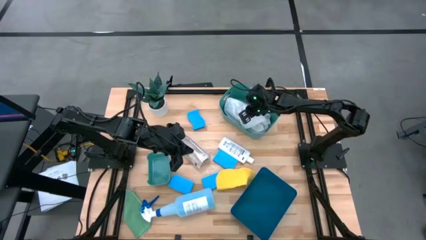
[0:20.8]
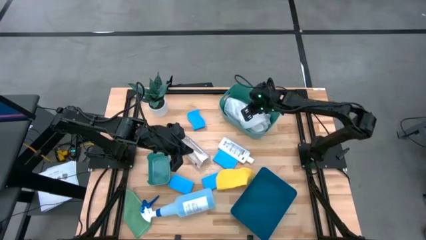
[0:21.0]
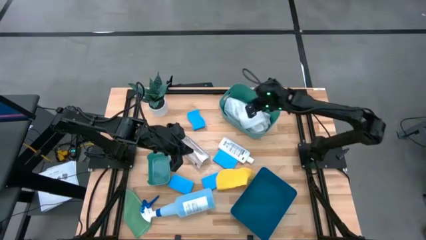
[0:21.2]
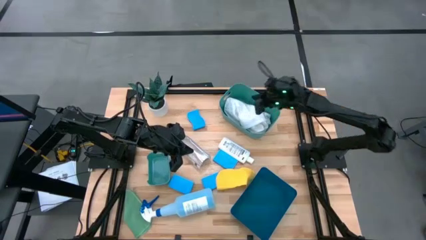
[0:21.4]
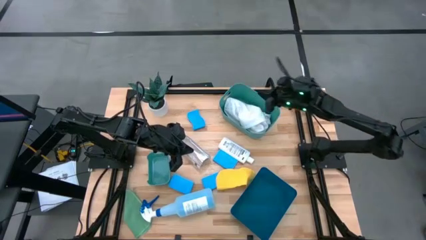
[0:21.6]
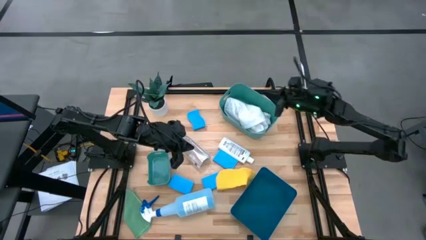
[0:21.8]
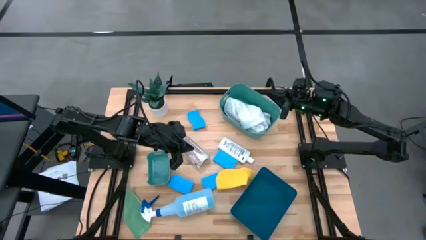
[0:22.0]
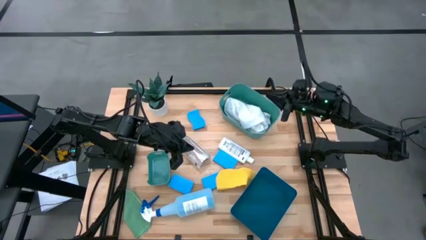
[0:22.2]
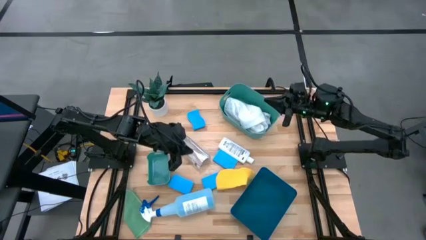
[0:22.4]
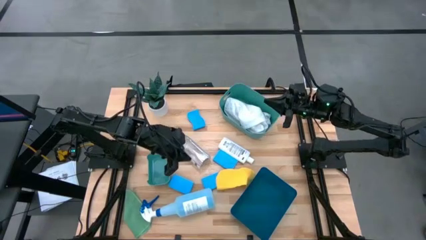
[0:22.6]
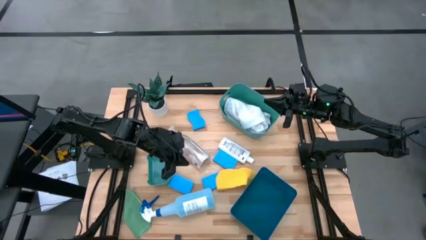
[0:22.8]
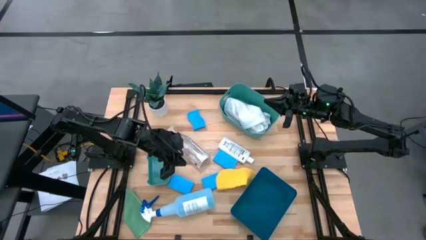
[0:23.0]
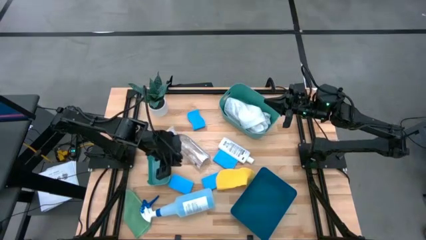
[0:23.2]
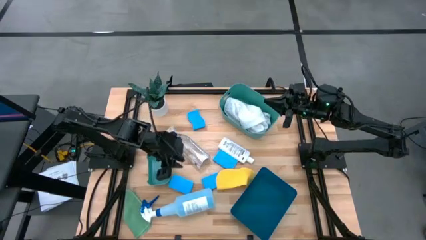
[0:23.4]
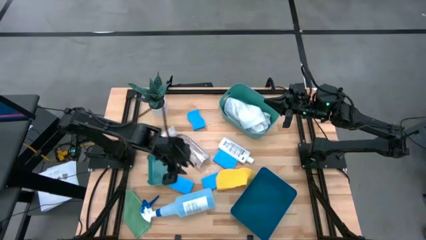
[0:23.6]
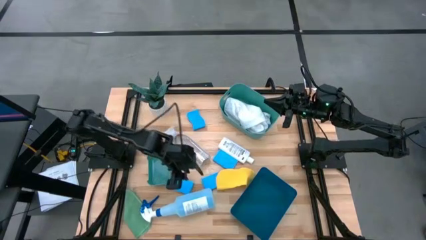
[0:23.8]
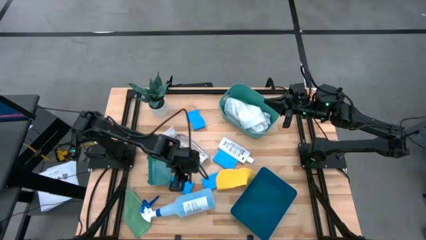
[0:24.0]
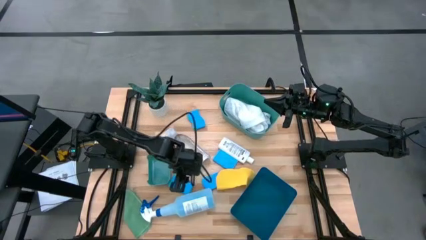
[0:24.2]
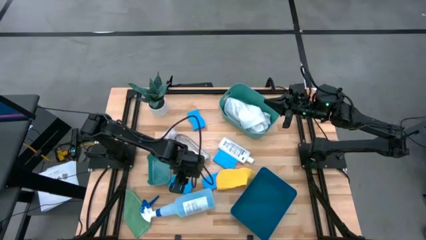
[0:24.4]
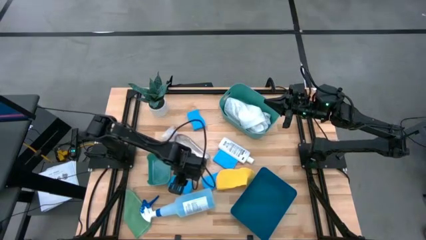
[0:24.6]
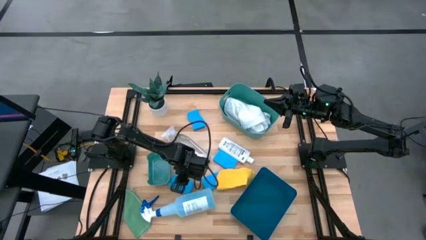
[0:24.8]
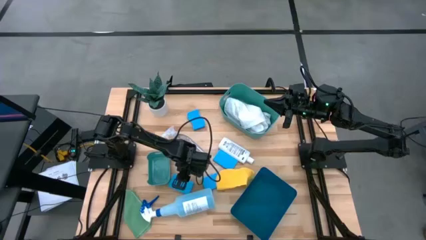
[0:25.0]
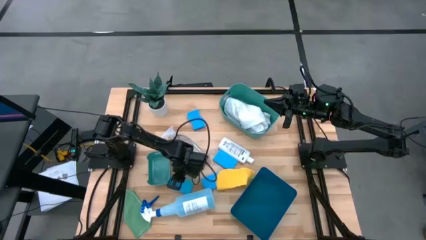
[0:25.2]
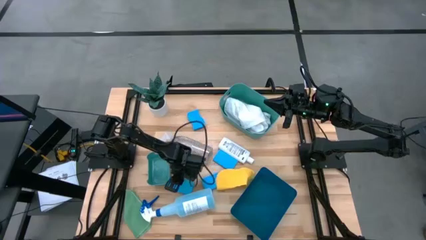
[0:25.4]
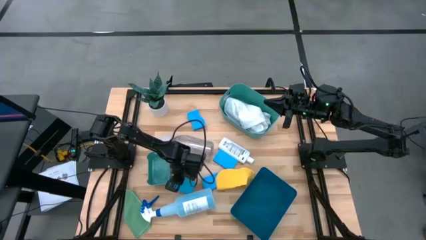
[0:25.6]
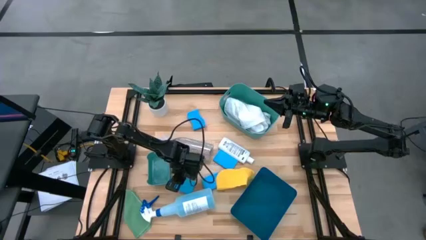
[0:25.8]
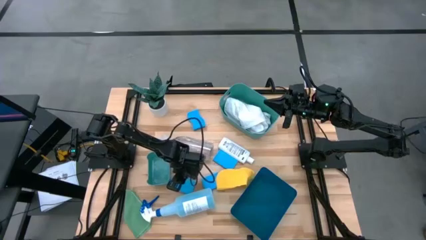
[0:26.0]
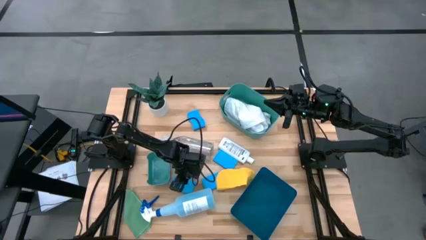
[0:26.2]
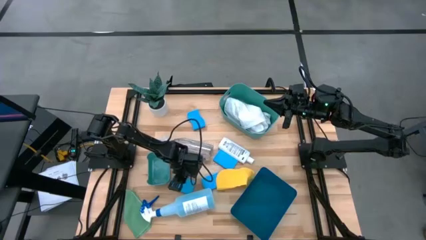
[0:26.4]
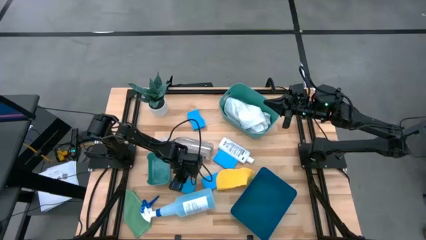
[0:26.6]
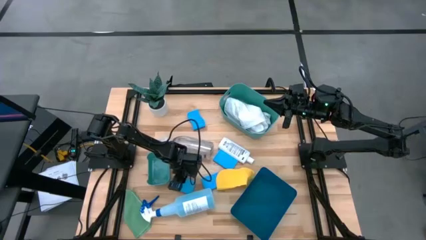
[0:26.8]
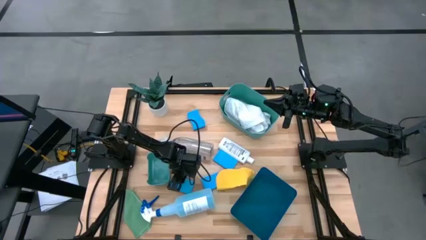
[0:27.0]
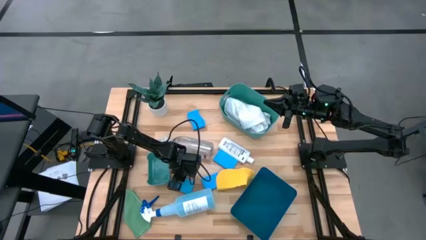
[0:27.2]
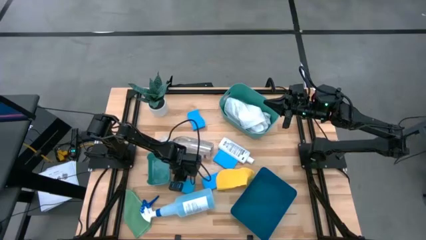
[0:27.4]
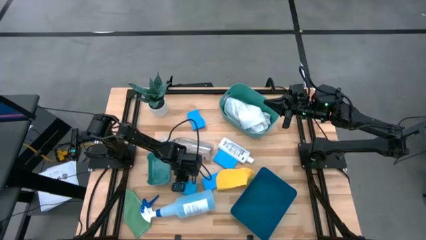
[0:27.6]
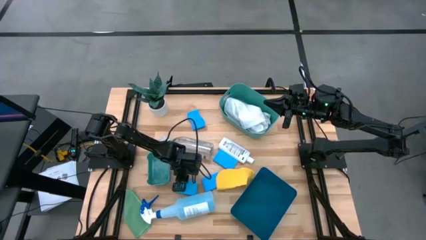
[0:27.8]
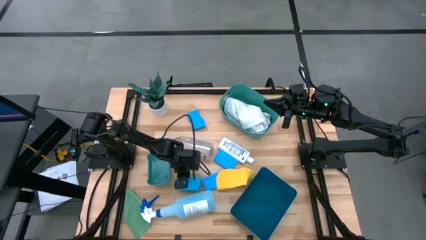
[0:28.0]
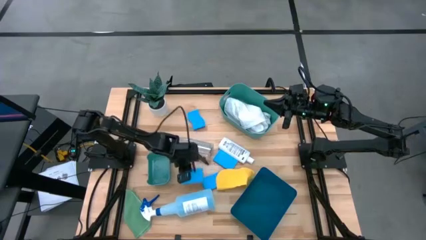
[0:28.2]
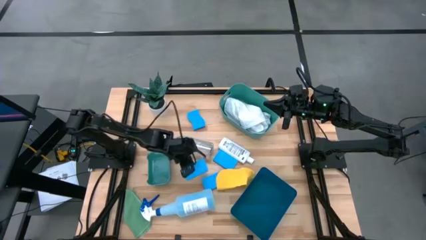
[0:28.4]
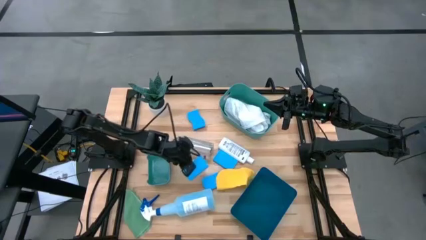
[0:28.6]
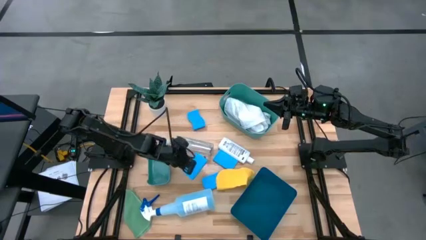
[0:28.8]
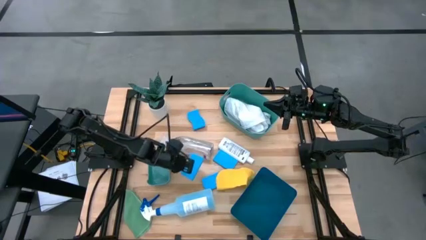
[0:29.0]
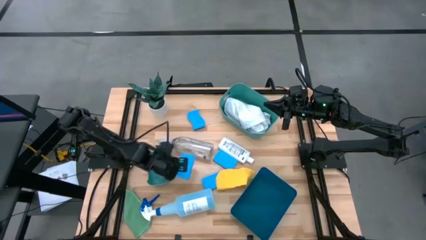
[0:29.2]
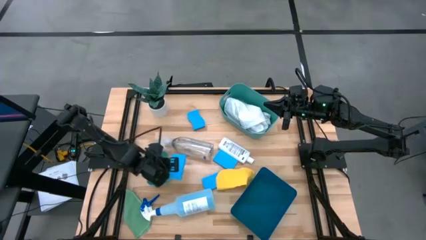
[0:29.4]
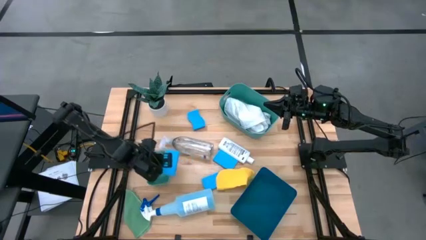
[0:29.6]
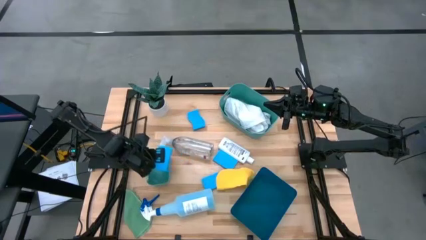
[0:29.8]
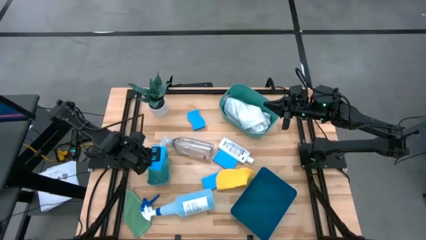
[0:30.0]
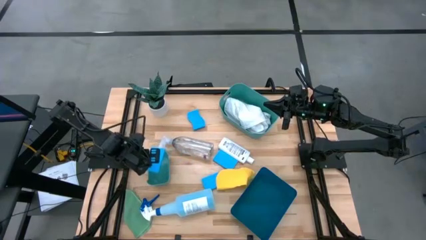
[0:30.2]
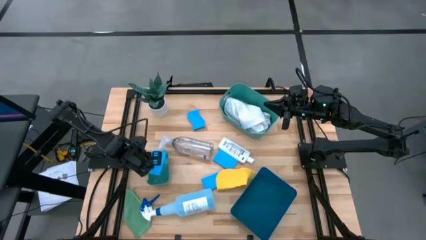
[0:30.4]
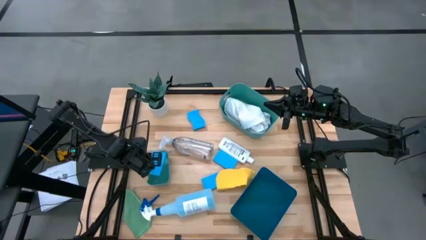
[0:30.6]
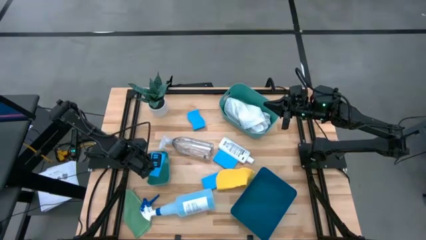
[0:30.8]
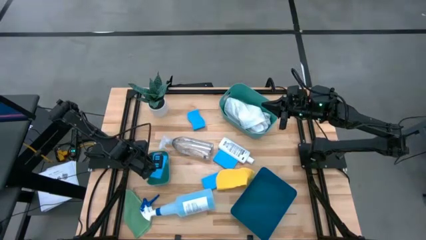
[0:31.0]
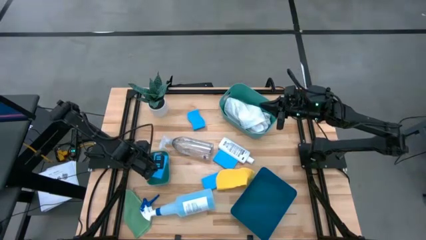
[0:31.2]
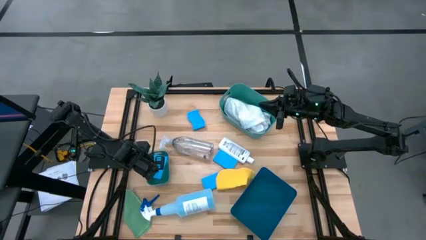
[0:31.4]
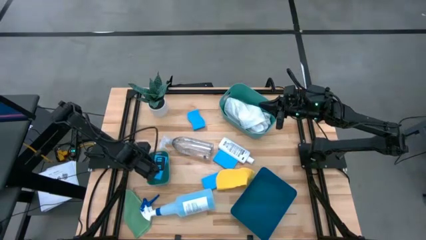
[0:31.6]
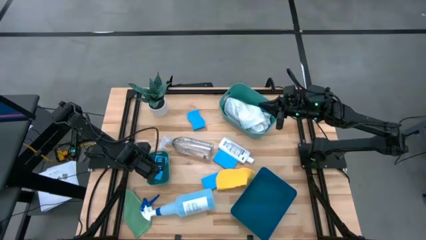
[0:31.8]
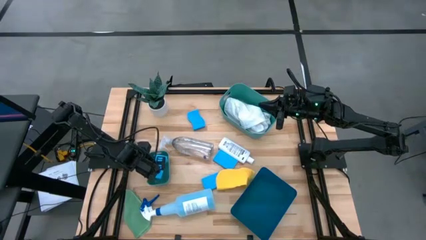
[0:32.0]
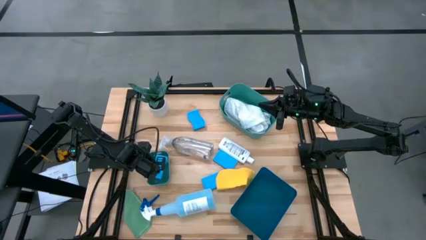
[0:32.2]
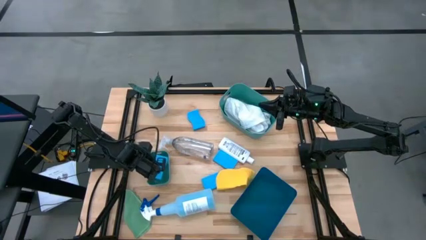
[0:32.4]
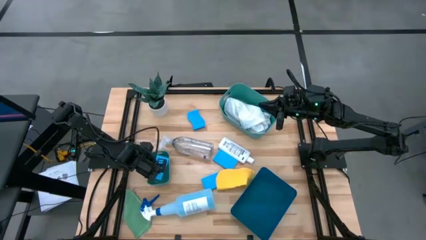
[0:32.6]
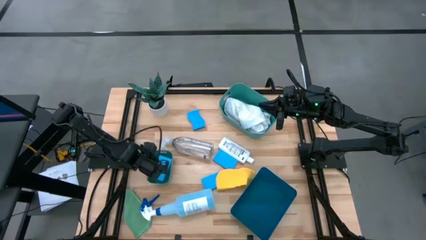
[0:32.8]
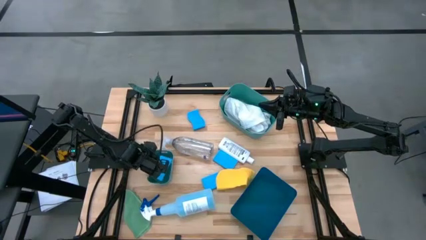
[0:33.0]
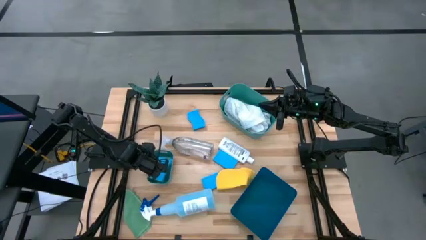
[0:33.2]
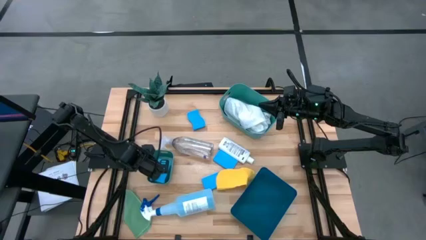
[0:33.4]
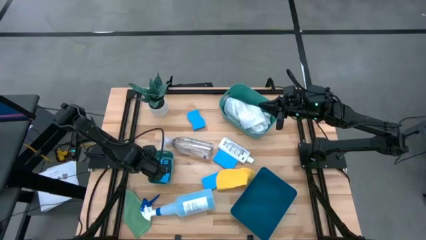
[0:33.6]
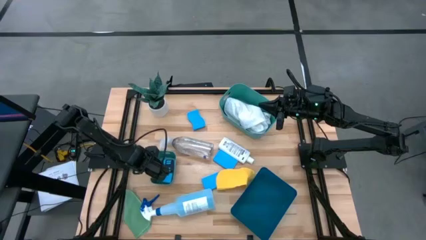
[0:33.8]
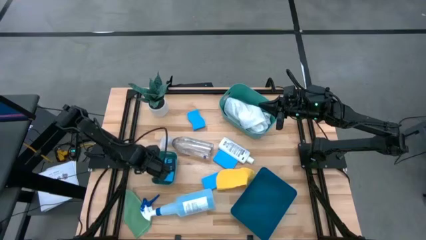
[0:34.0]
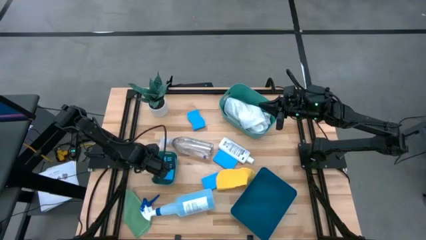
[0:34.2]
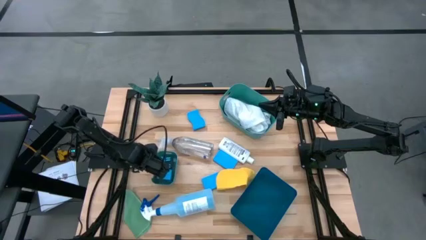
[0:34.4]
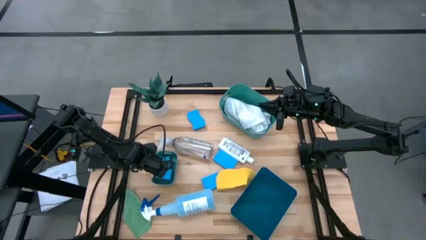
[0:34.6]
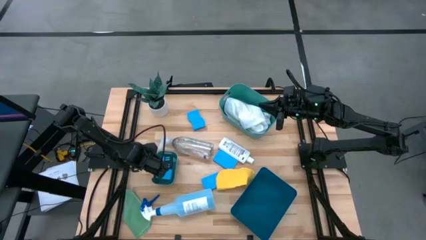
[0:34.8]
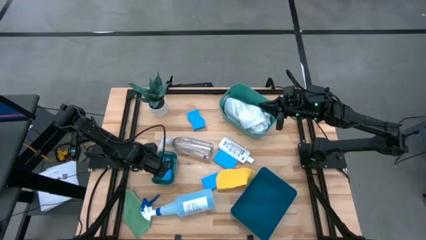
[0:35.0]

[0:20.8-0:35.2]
Task: Pick & Place Kitchen Items
Put the bottom left blue sponge into the small green bin

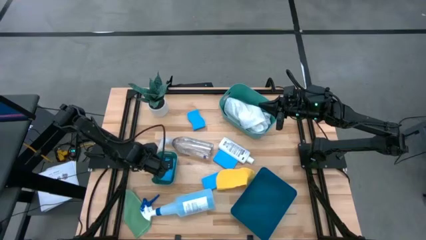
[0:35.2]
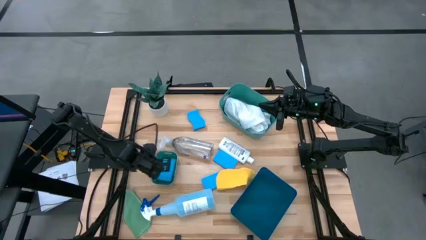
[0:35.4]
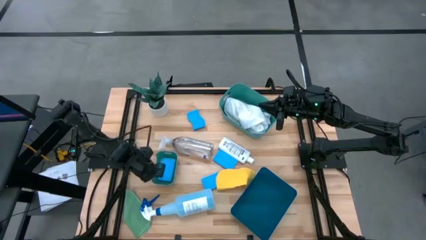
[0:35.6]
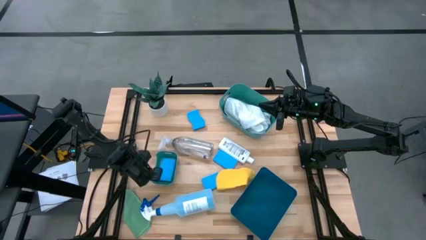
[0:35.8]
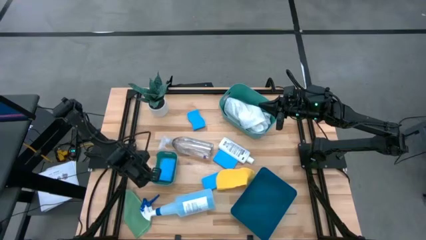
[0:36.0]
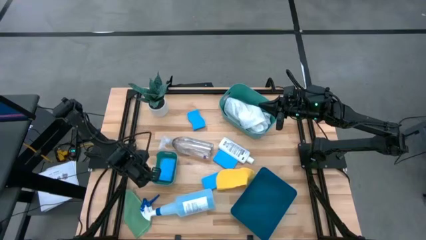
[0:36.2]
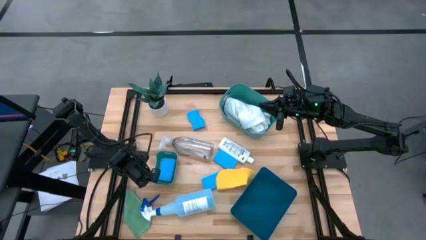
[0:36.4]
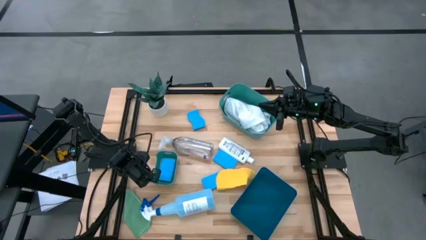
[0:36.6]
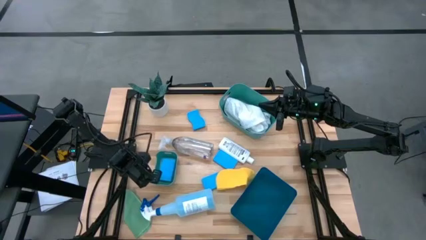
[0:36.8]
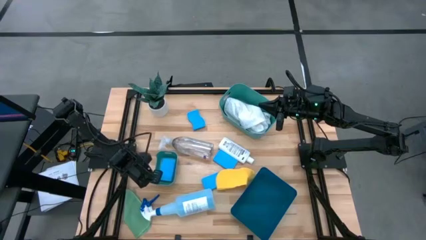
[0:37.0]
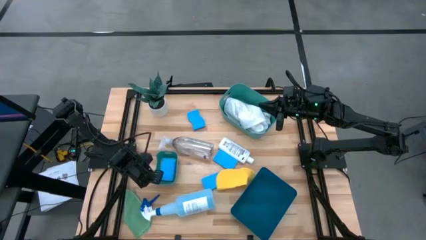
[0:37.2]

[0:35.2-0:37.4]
Adjust the small green bin
